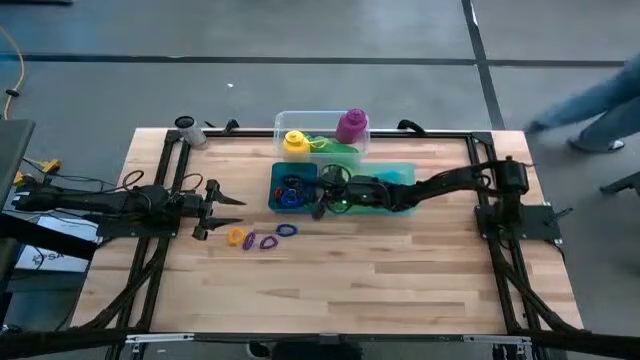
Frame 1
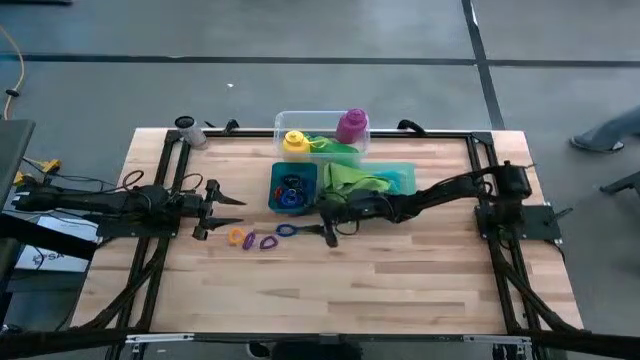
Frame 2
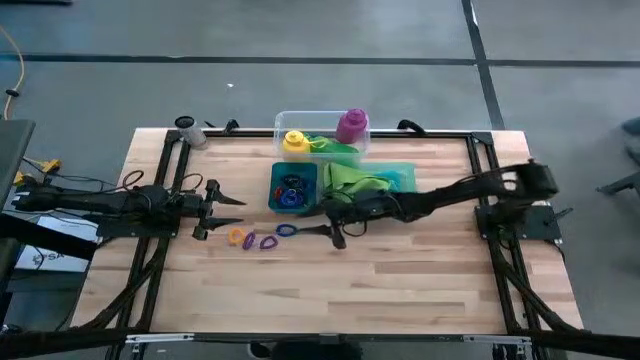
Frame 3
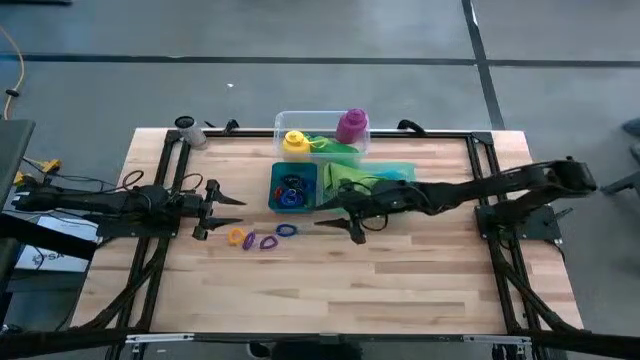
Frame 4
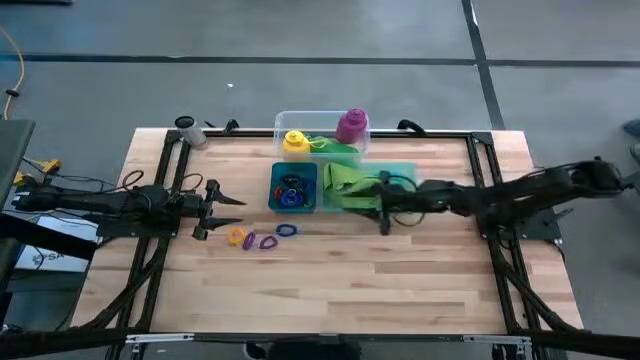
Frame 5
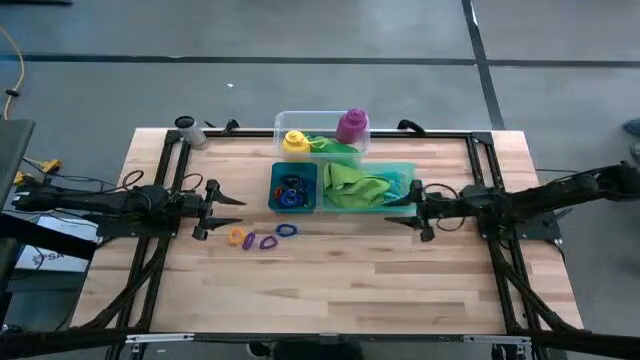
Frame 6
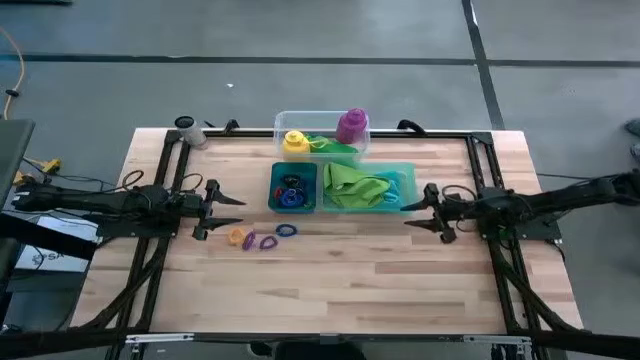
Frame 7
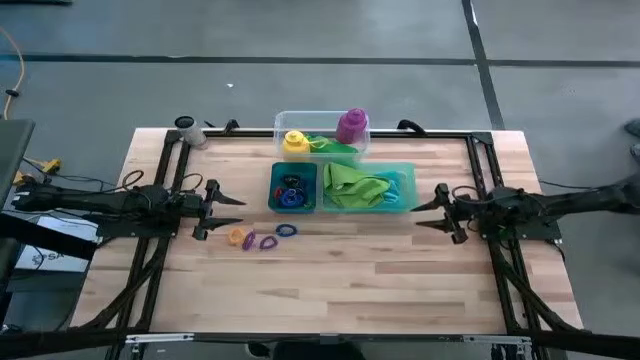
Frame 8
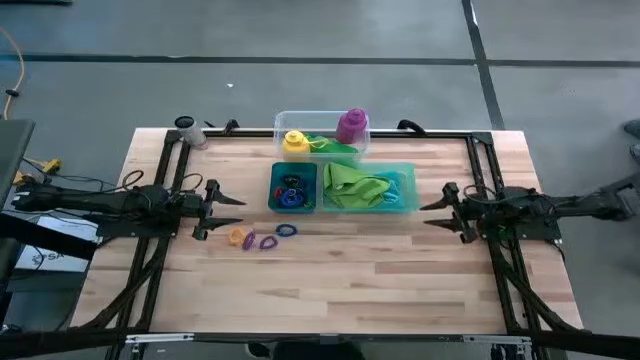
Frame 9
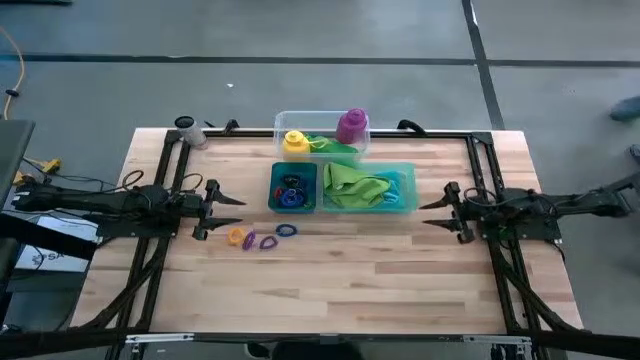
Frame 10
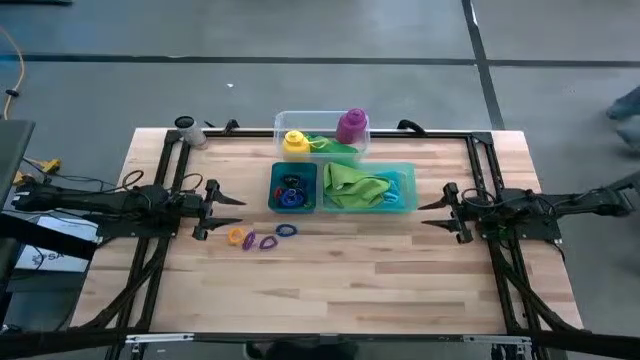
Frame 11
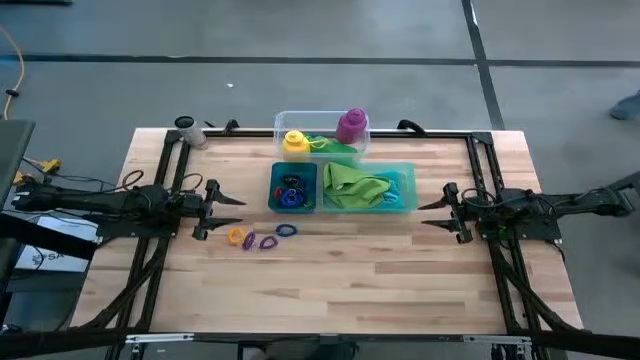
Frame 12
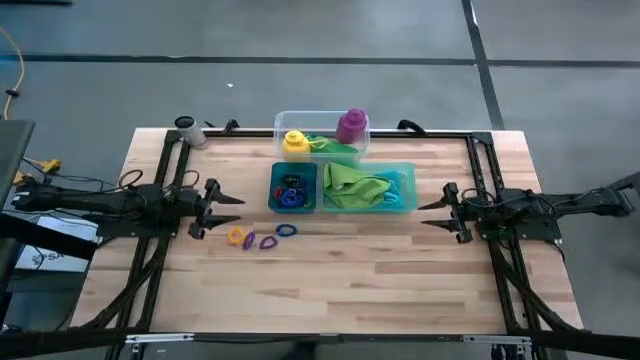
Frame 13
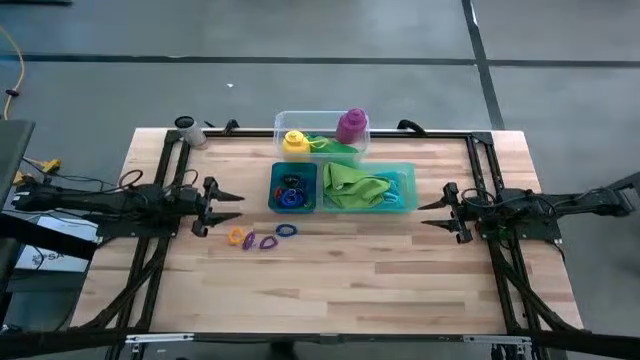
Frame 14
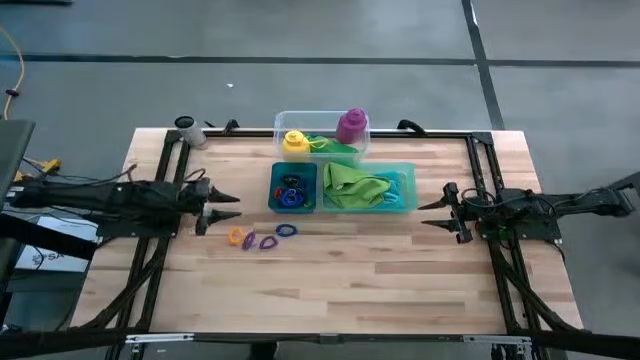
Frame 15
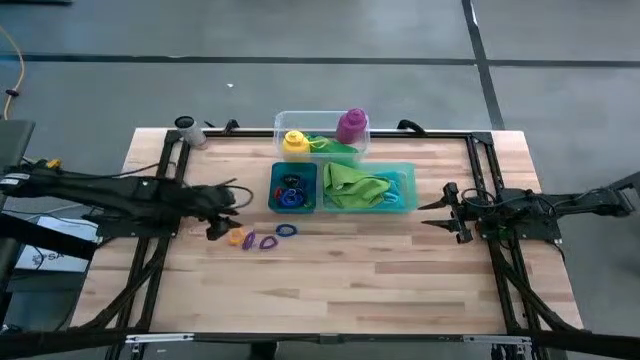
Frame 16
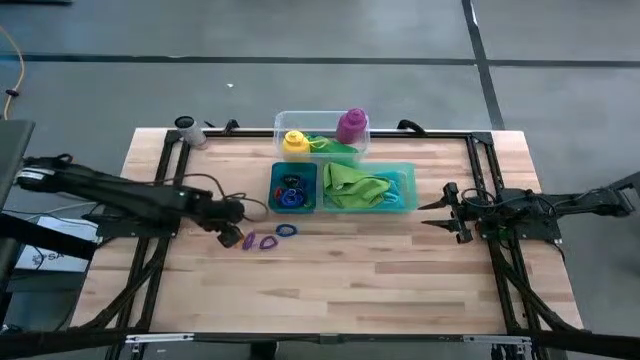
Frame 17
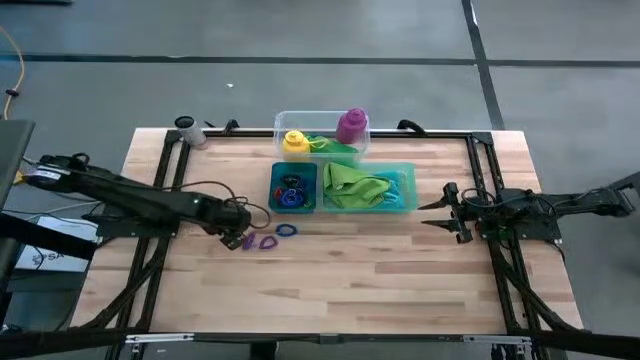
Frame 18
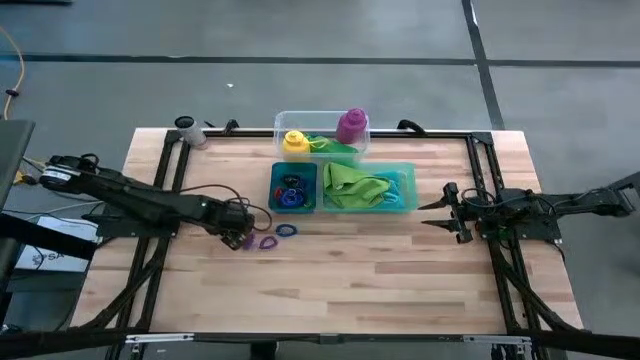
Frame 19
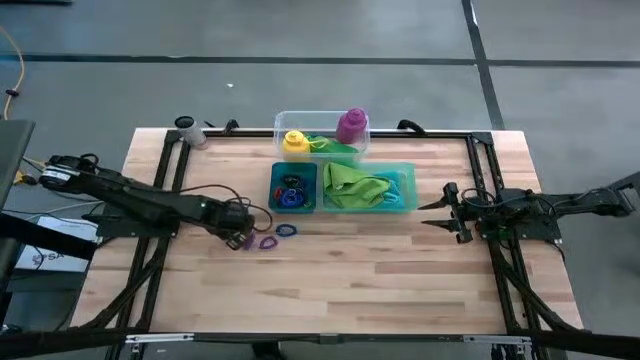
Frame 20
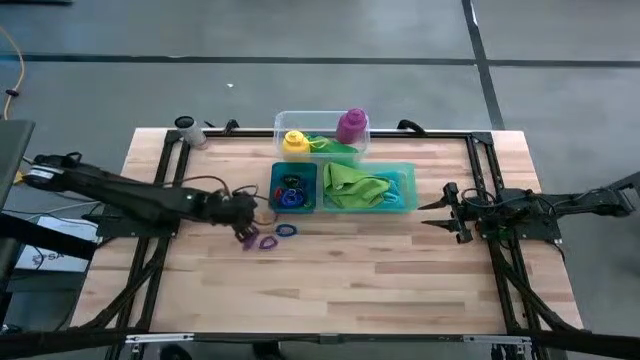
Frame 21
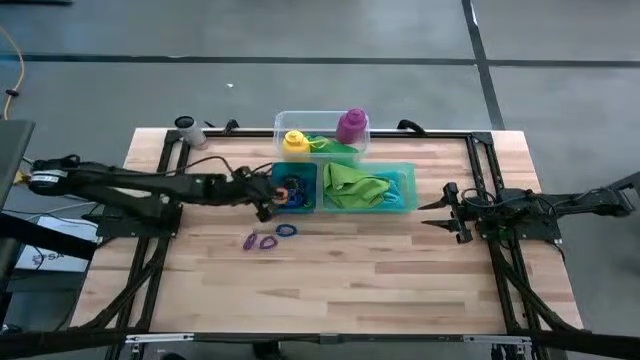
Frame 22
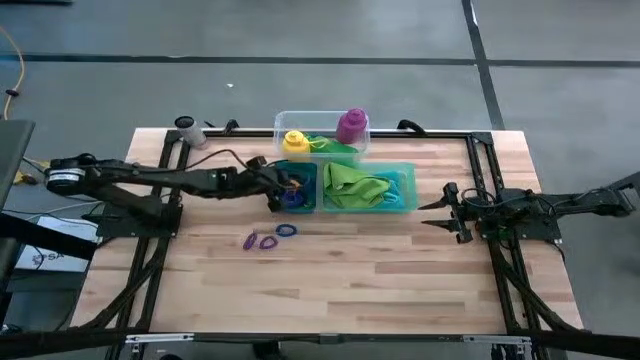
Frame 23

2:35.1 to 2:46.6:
Task: Pick & Place Sports Items
Put the yellow spring keychain into the blue bin

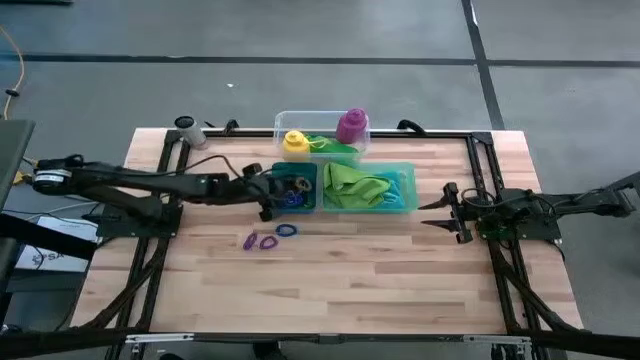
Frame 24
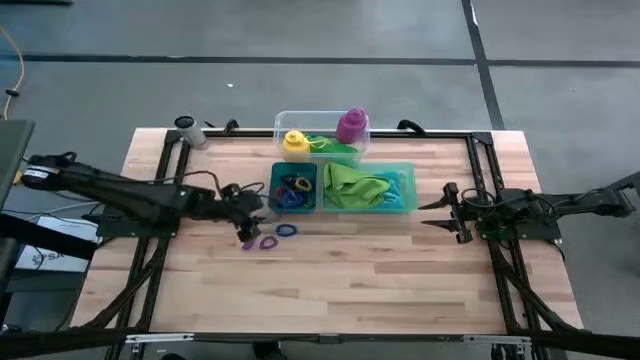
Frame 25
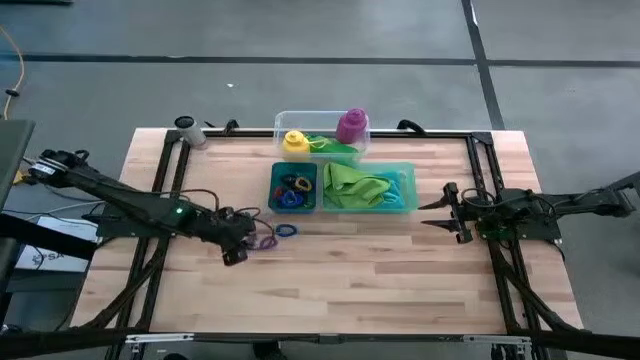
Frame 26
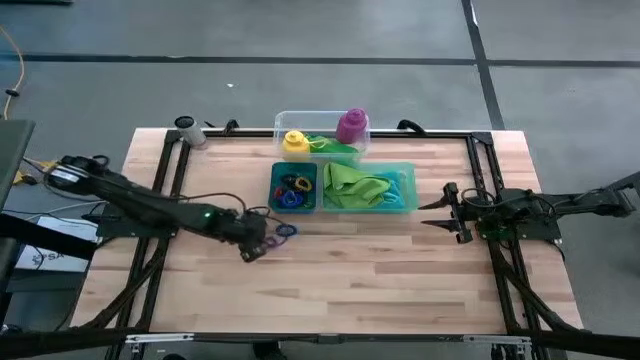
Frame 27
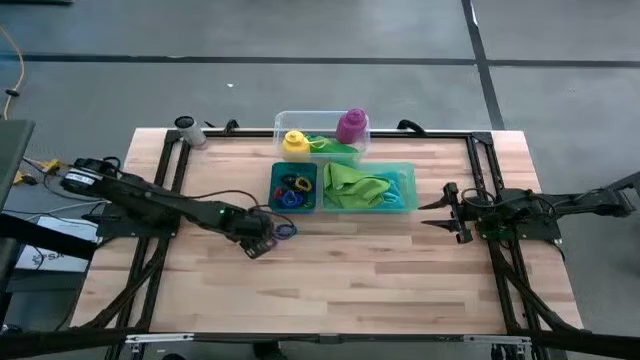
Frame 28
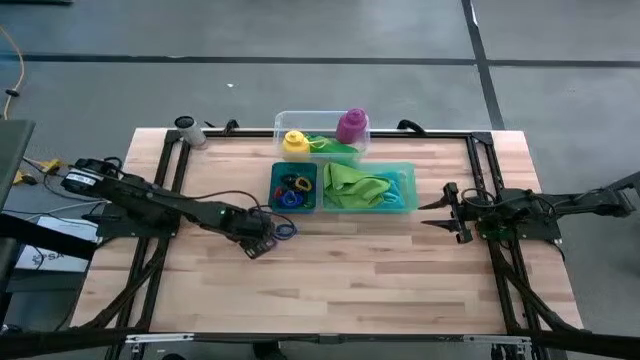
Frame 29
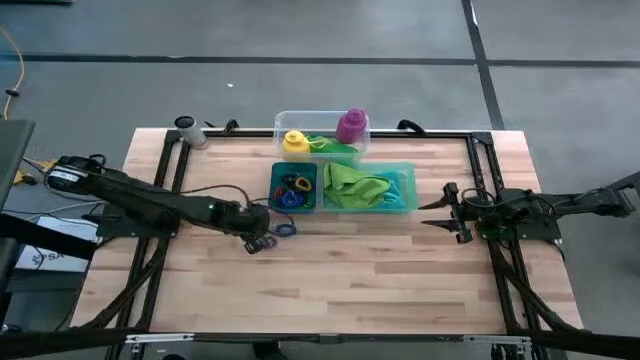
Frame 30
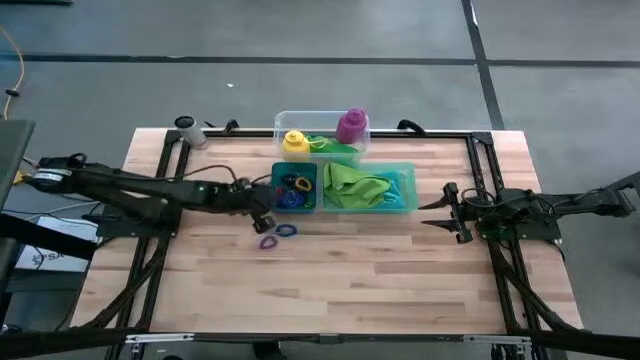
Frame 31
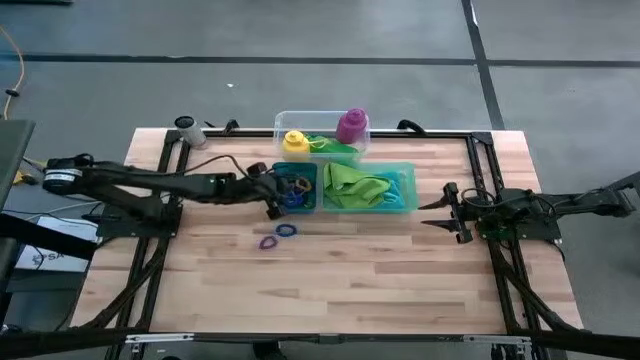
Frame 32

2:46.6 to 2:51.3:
Put the left purple spring keychain into the blue bin

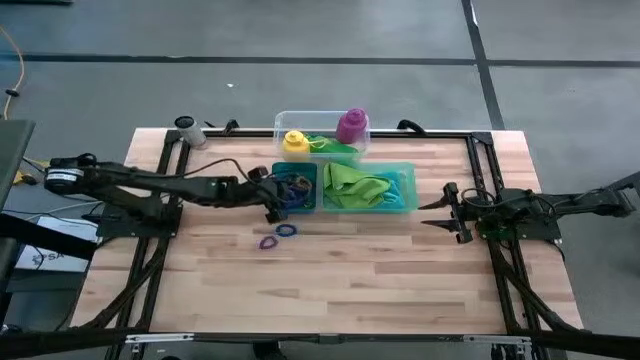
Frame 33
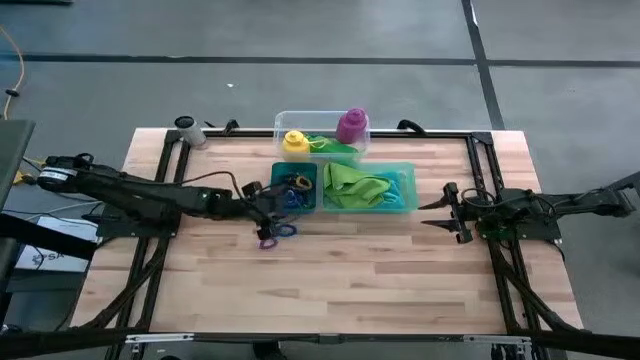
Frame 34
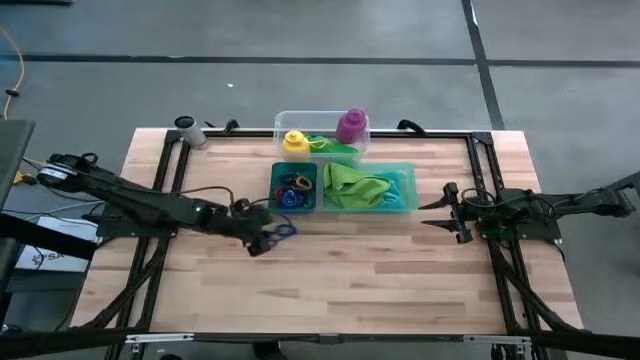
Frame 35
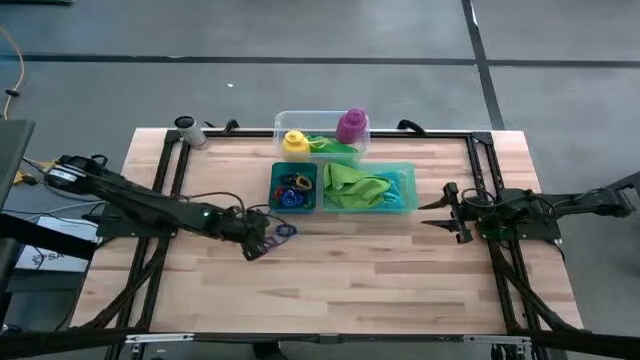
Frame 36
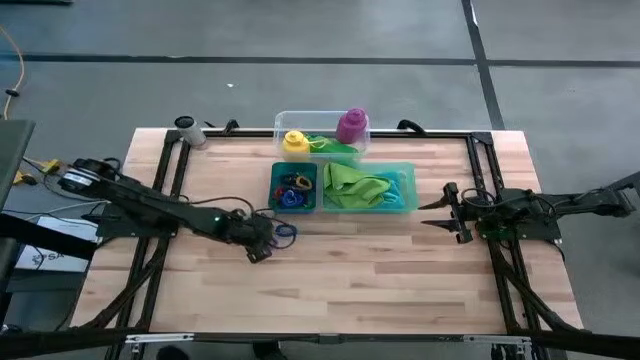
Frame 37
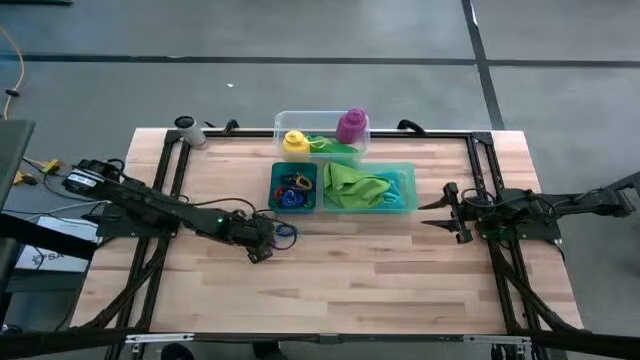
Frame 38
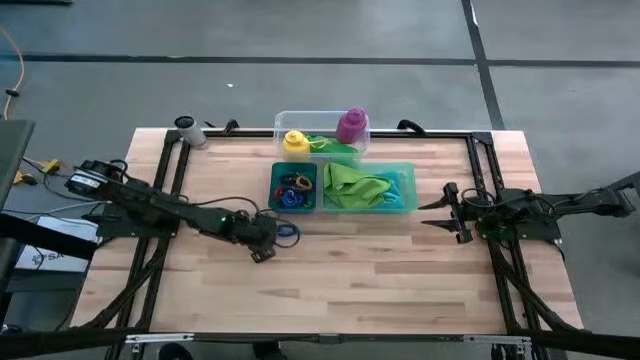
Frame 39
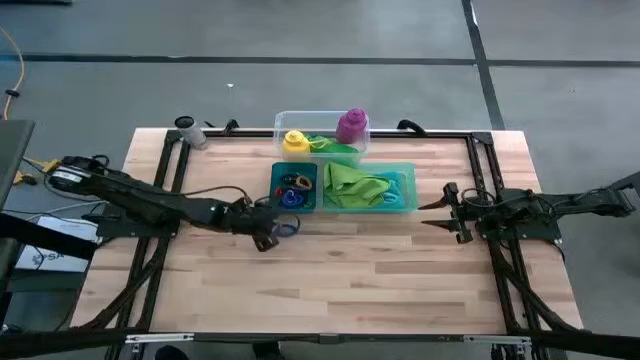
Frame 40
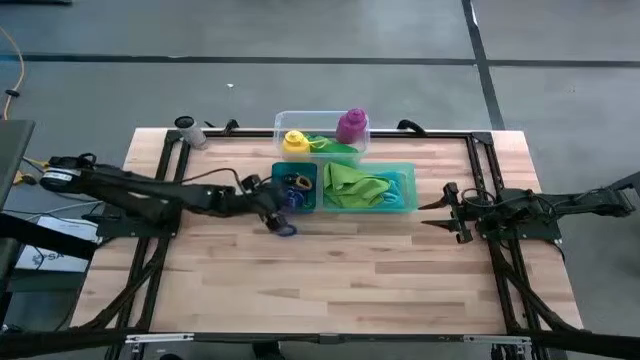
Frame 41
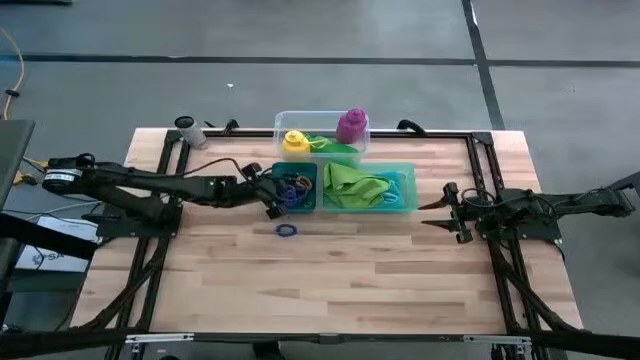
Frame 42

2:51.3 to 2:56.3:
Put the purple spring keychain into the blue bin
